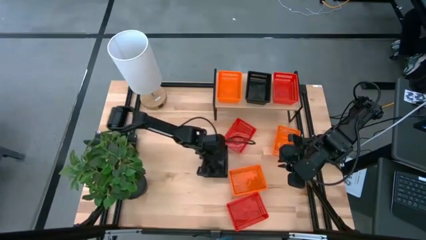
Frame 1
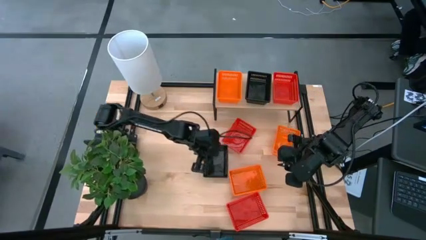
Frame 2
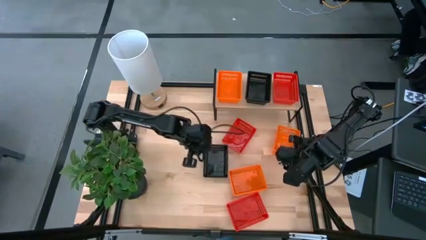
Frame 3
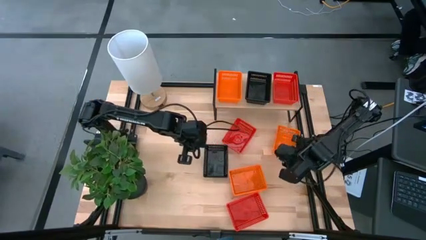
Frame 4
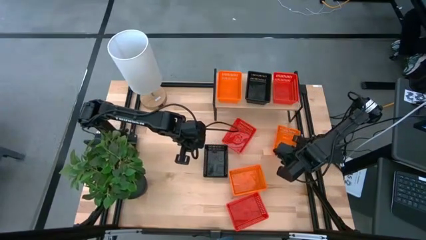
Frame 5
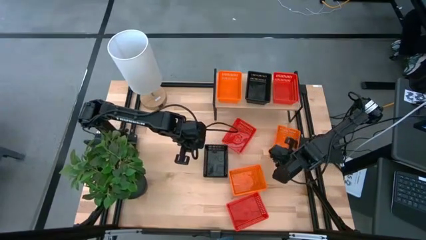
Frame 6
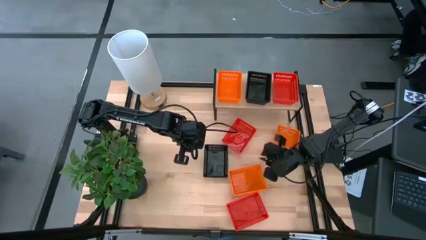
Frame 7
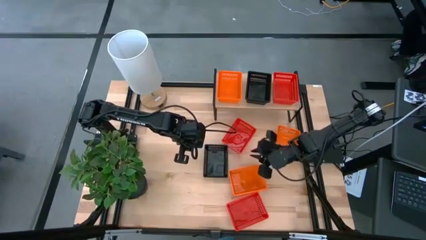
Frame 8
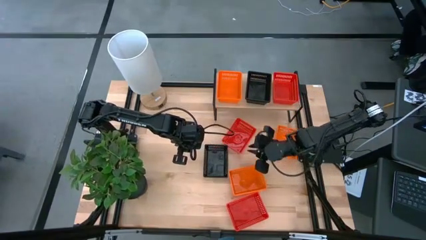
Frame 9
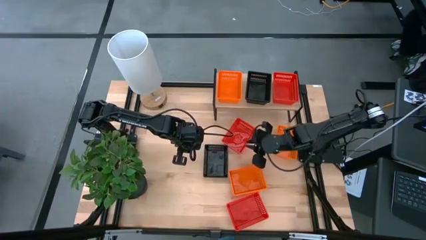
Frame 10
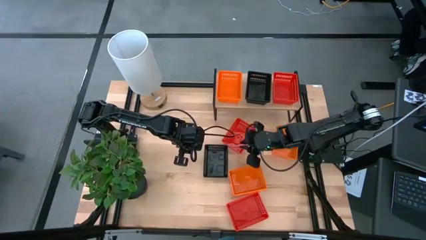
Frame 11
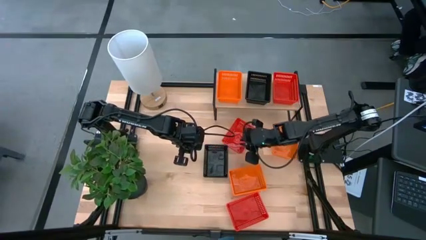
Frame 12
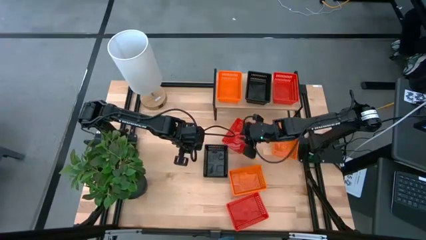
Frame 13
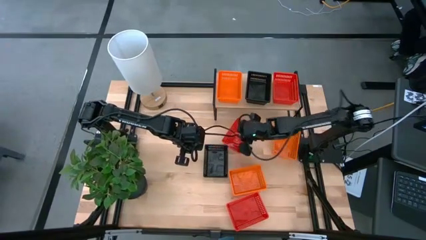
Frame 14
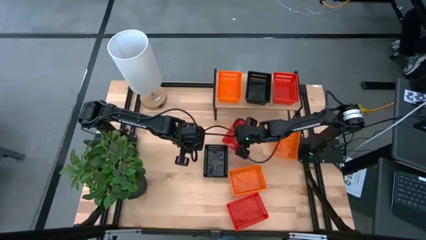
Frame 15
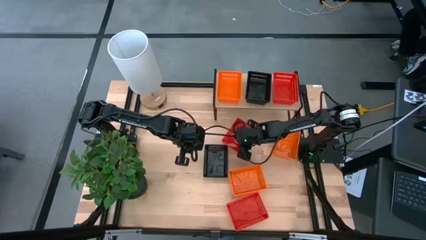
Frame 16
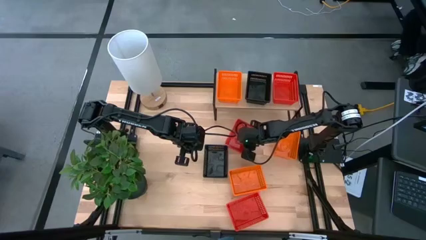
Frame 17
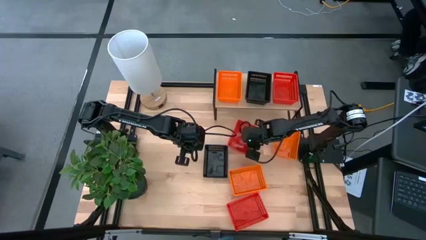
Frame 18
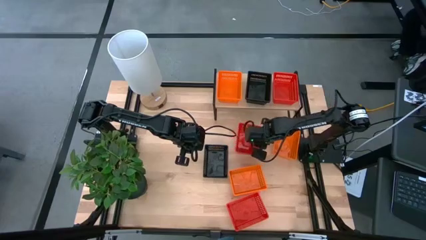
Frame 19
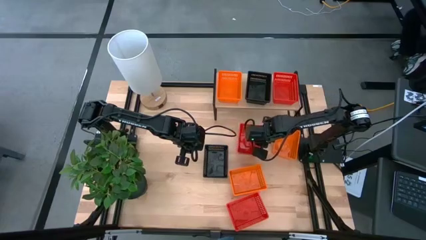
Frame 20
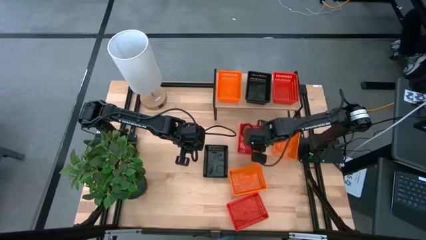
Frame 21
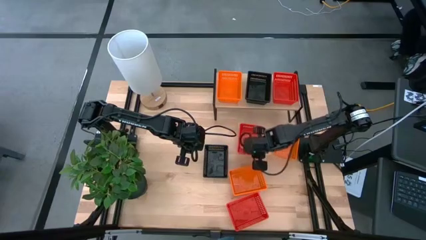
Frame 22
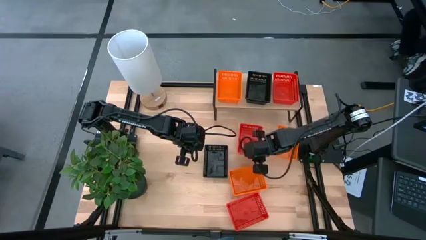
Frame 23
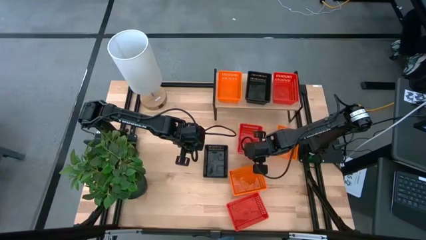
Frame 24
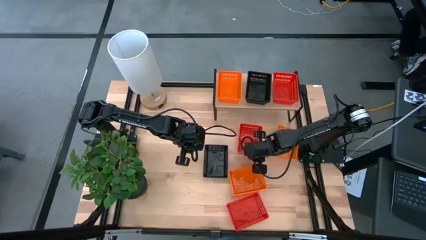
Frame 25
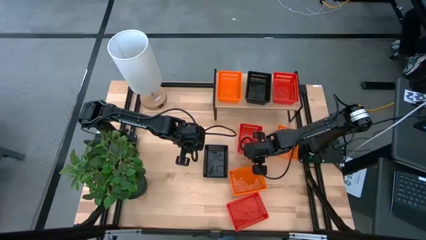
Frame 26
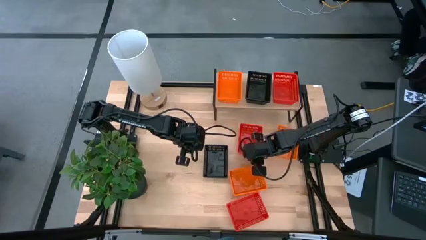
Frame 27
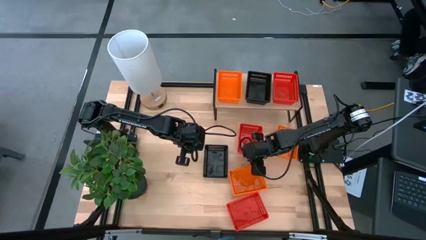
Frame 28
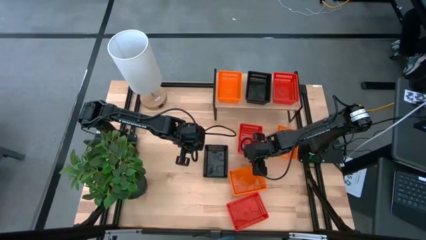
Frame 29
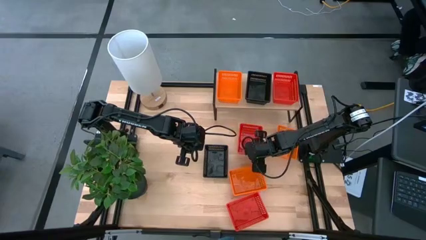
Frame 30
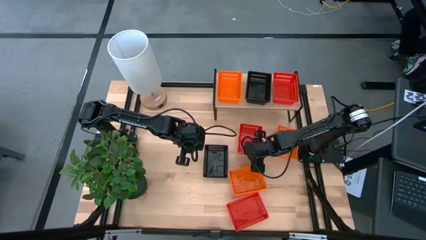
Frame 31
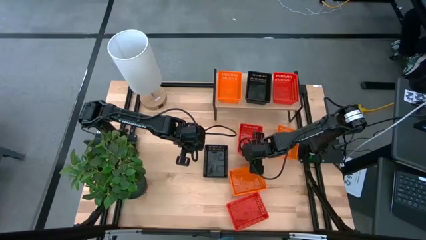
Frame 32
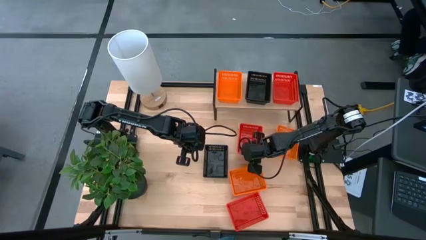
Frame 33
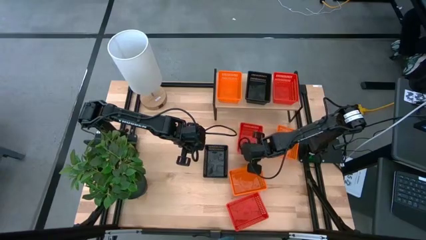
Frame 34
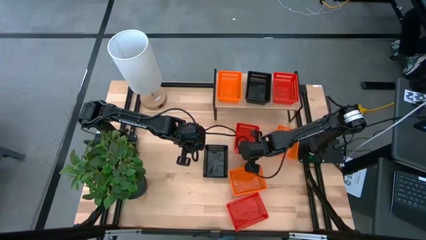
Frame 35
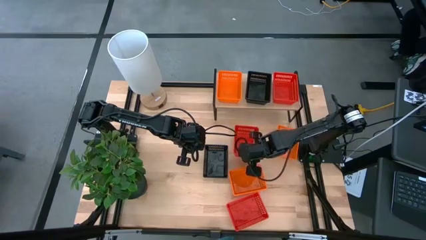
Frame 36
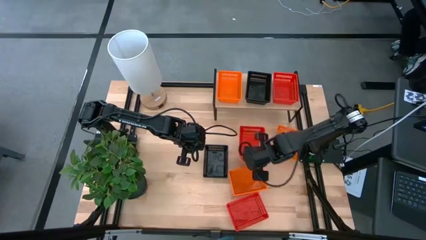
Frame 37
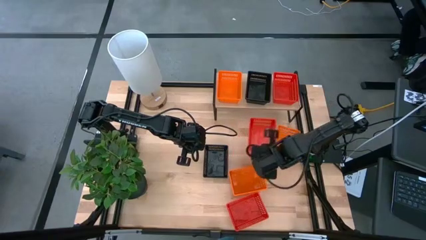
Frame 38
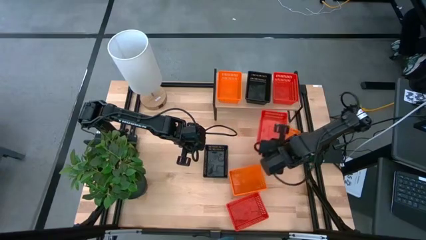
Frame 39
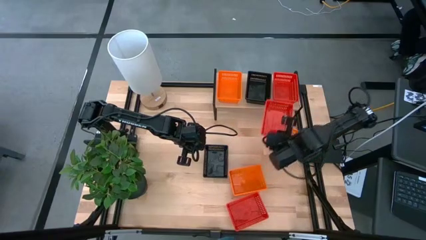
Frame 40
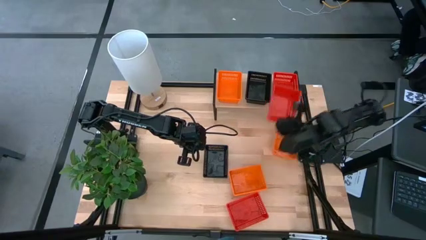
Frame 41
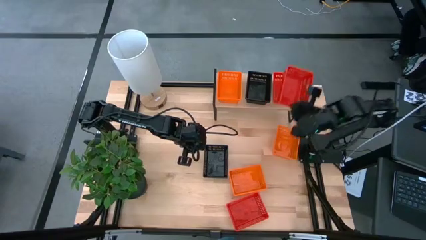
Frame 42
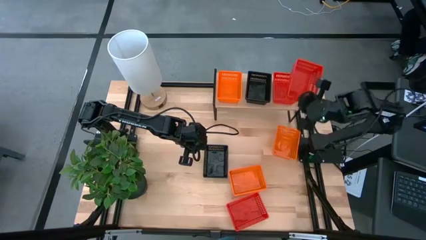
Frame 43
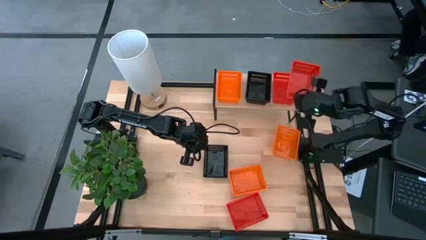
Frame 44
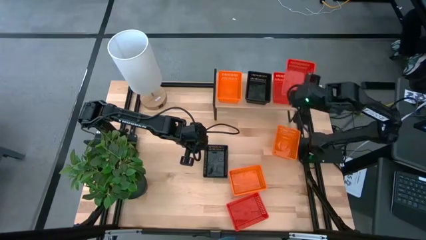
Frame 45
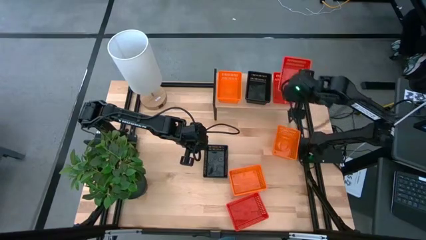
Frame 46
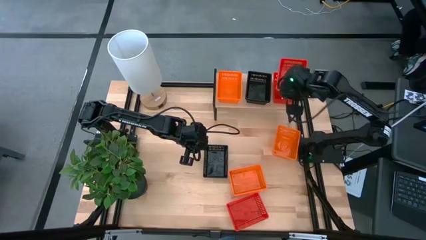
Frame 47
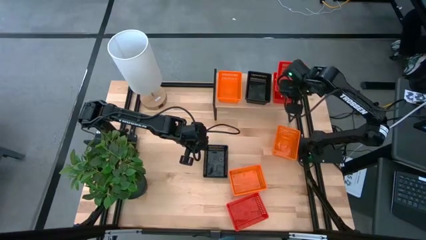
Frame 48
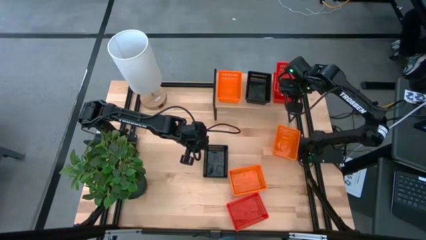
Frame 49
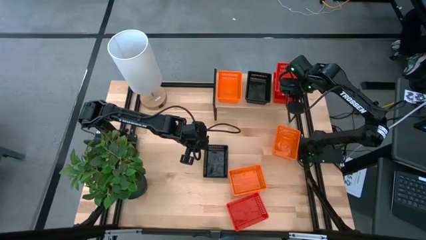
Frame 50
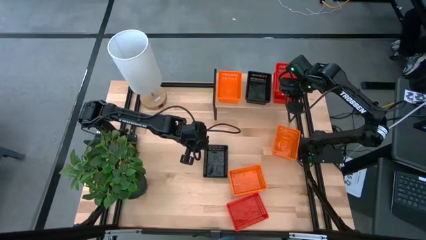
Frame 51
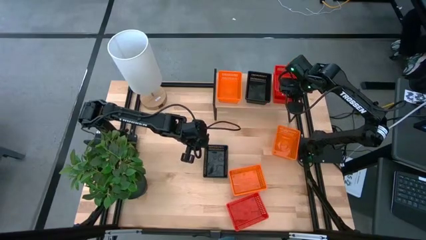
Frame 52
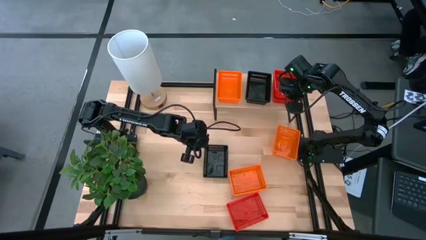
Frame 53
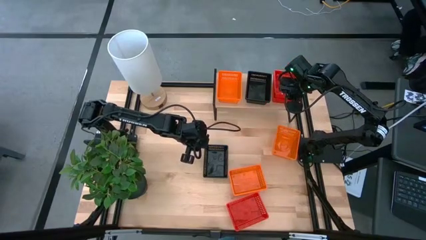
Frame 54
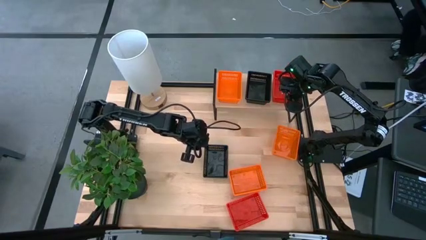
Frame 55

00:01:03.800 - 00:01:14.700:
Task: Stack baskets on shelf by color
Stack the top red bin on the red bin on the shelf

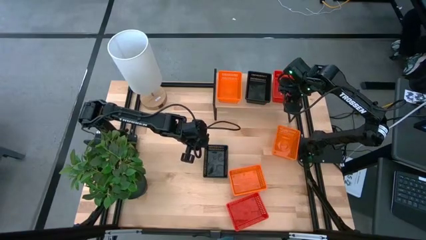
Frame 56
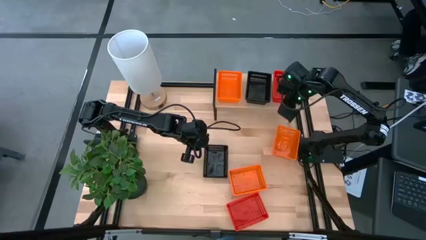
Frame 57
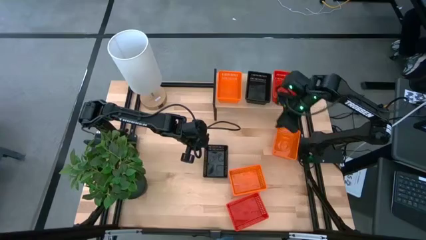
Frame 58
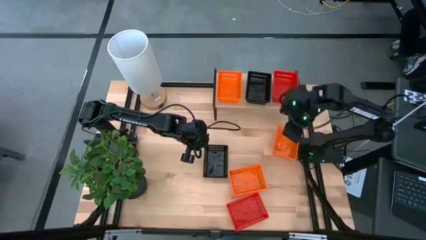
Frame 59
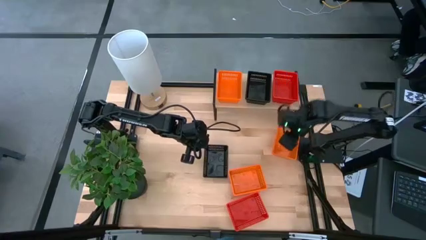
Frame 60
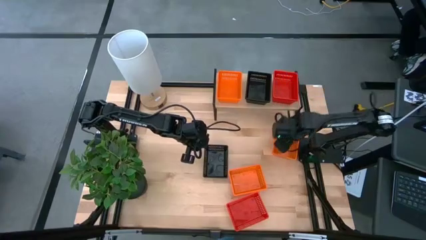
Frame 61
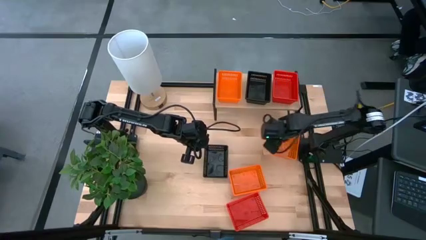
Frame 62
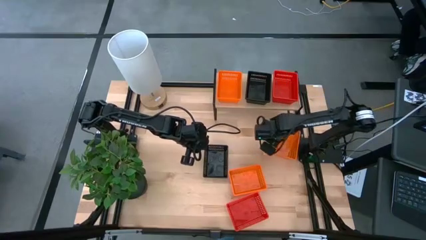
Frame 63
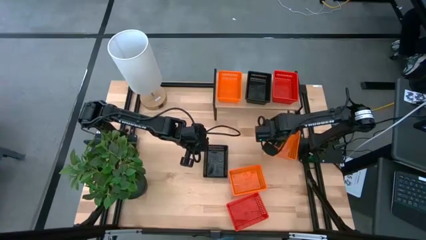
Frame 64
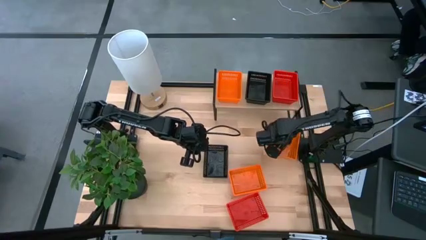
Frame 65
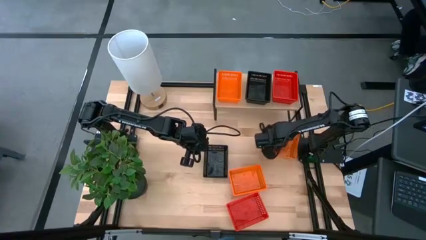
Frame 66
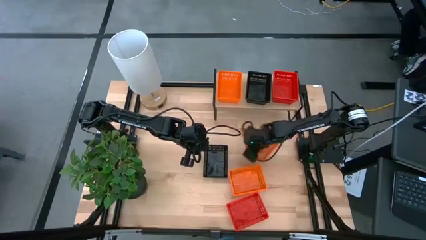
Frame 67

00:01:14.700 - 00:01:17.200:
Adjust the top orange bin on the table
